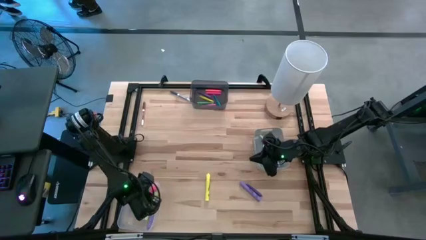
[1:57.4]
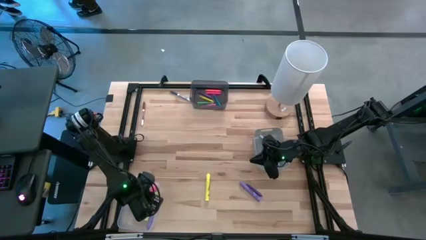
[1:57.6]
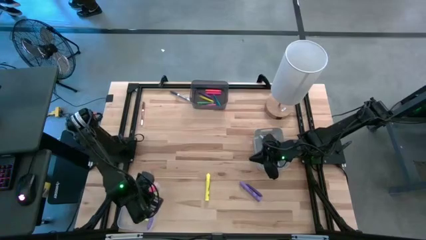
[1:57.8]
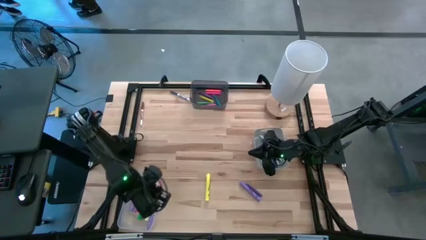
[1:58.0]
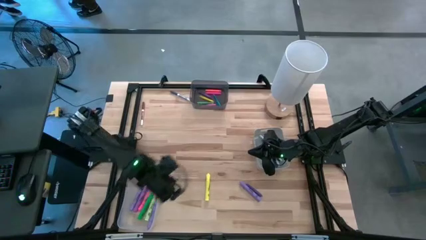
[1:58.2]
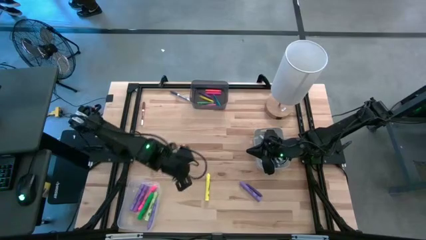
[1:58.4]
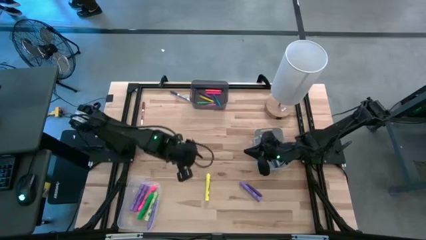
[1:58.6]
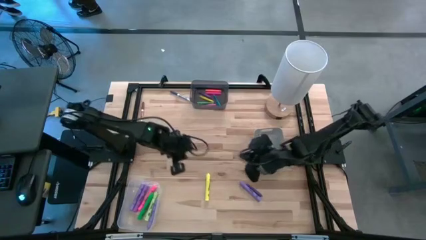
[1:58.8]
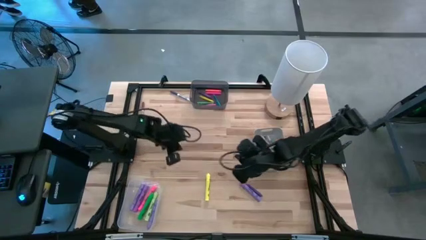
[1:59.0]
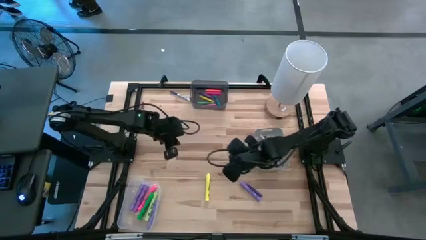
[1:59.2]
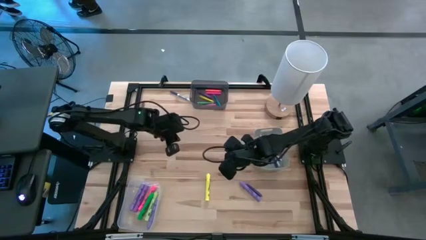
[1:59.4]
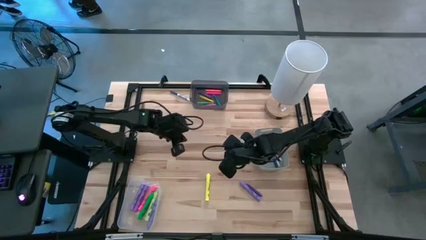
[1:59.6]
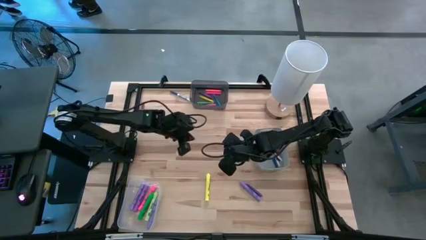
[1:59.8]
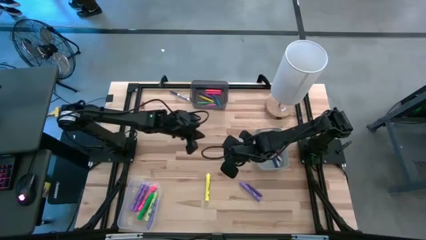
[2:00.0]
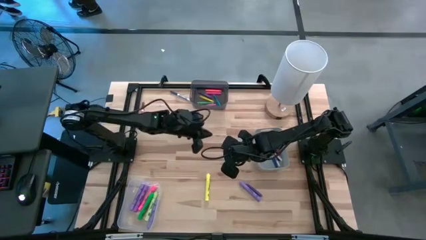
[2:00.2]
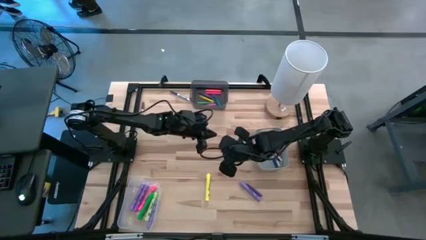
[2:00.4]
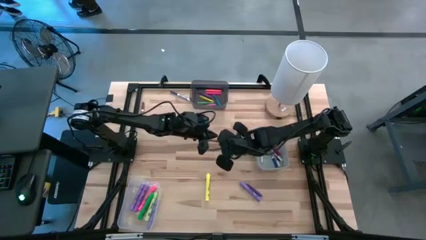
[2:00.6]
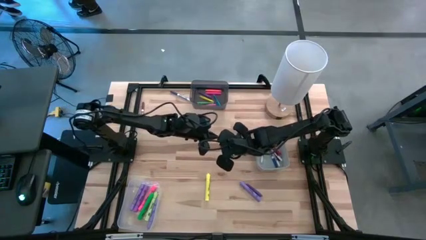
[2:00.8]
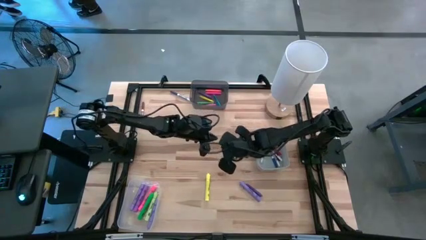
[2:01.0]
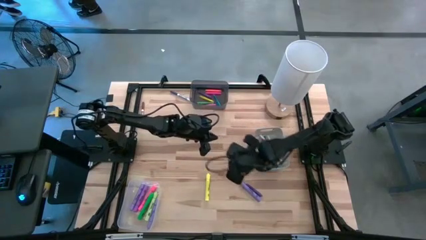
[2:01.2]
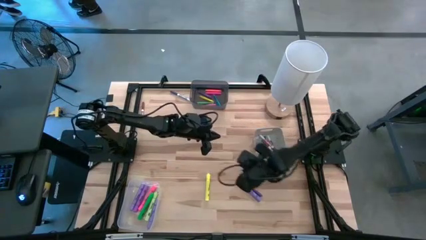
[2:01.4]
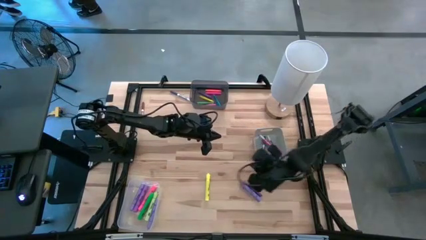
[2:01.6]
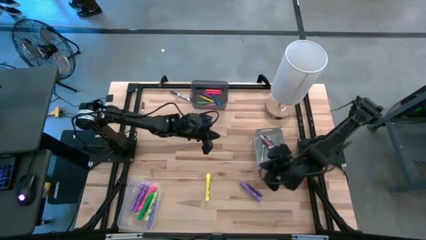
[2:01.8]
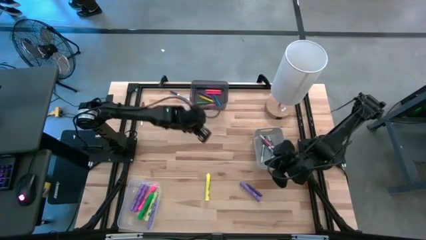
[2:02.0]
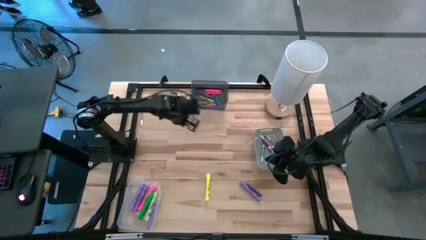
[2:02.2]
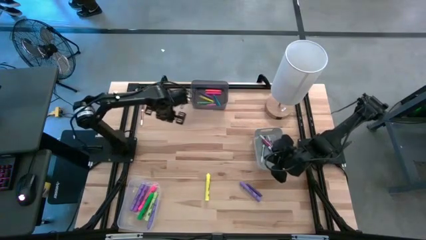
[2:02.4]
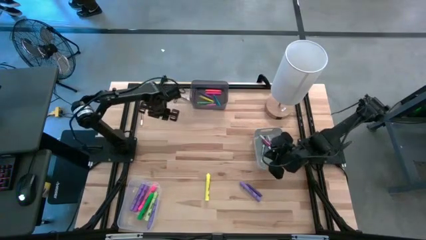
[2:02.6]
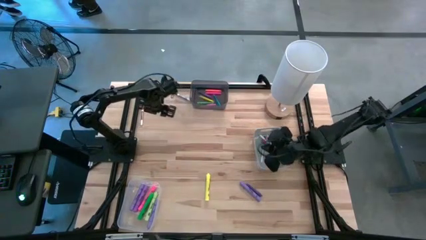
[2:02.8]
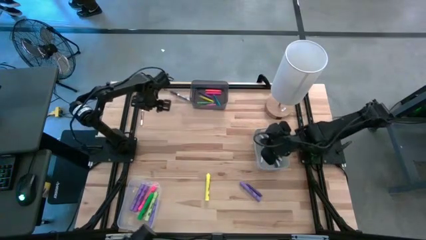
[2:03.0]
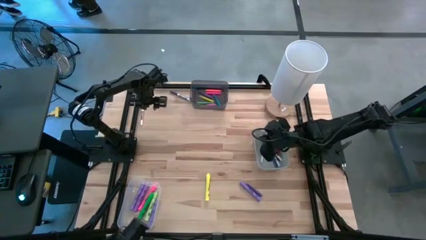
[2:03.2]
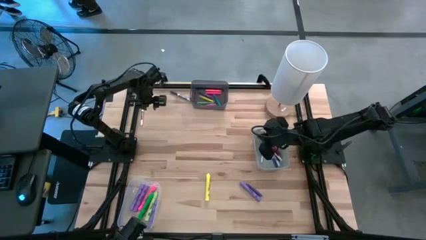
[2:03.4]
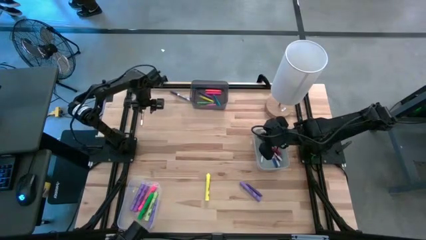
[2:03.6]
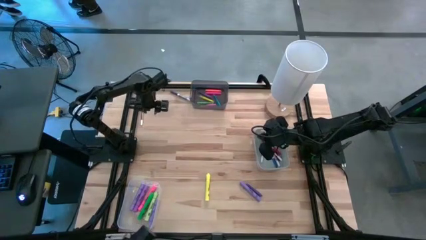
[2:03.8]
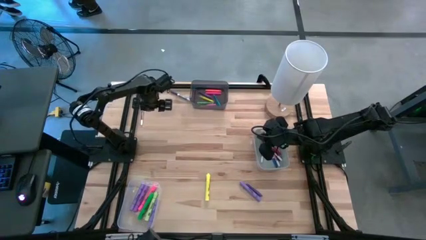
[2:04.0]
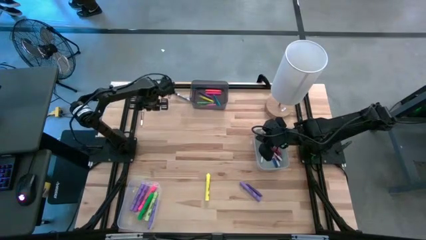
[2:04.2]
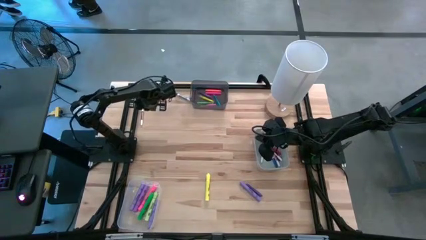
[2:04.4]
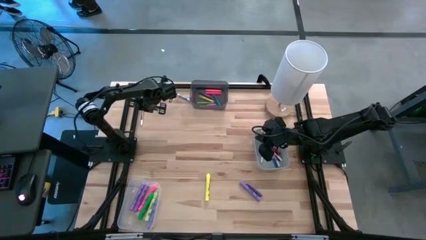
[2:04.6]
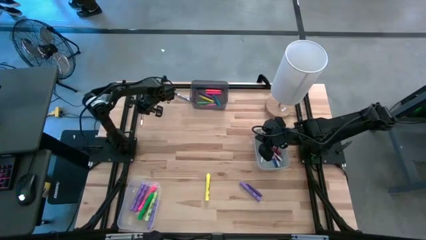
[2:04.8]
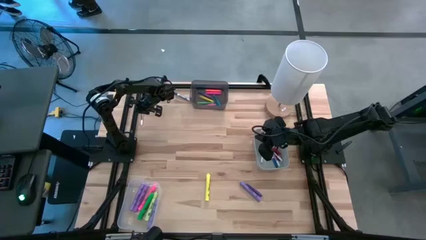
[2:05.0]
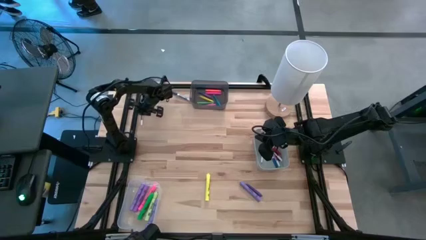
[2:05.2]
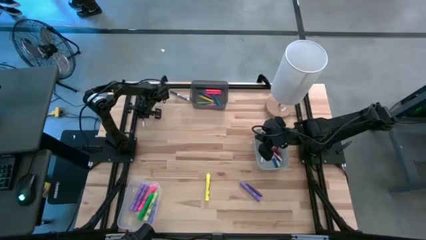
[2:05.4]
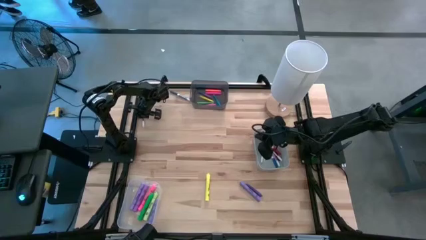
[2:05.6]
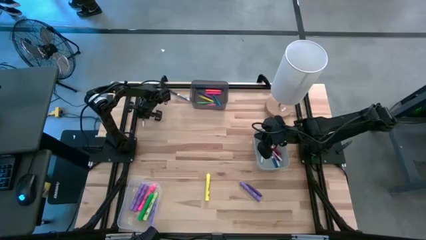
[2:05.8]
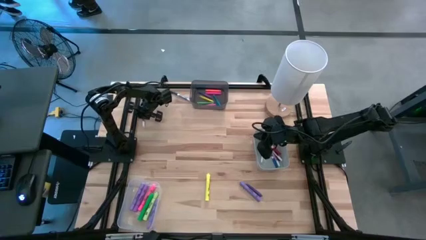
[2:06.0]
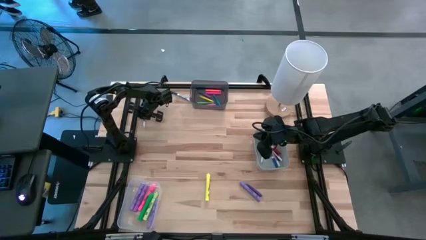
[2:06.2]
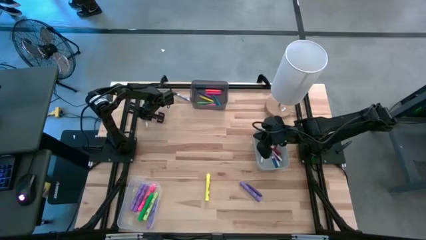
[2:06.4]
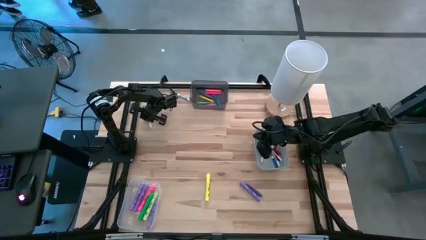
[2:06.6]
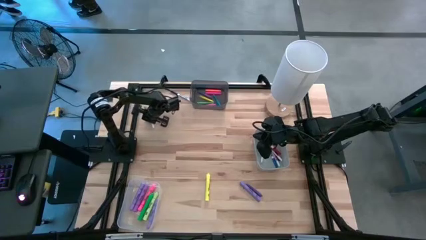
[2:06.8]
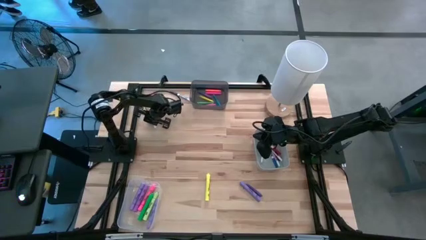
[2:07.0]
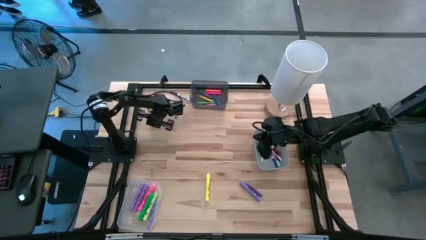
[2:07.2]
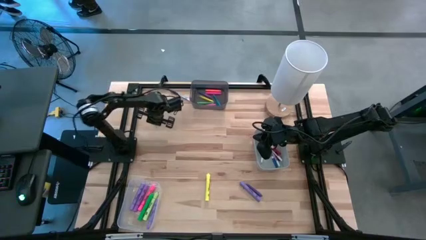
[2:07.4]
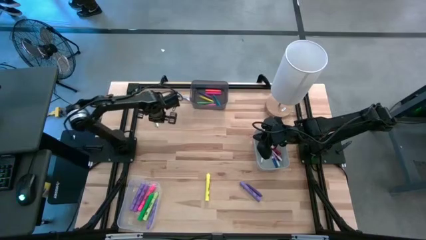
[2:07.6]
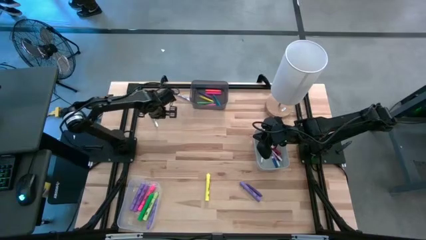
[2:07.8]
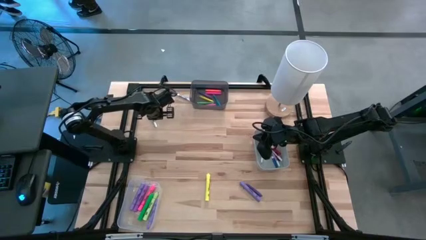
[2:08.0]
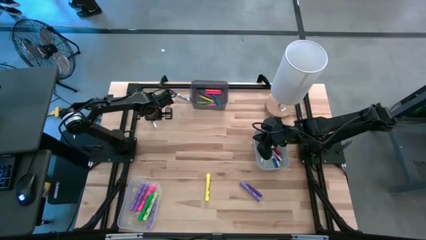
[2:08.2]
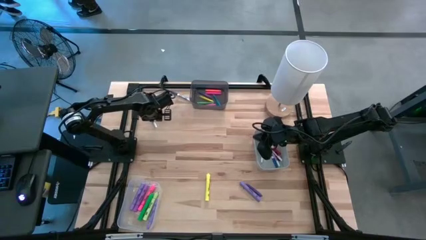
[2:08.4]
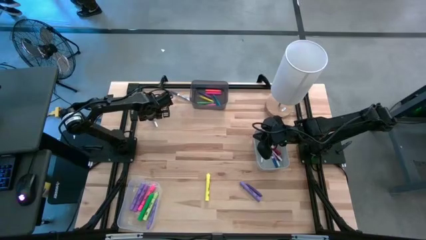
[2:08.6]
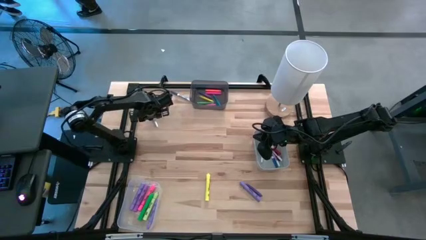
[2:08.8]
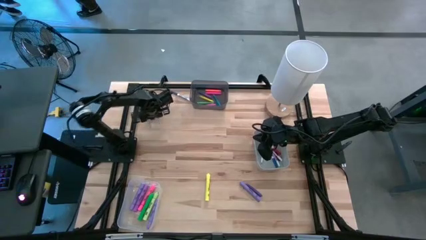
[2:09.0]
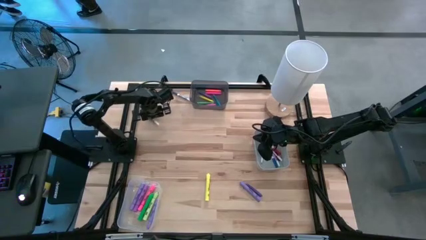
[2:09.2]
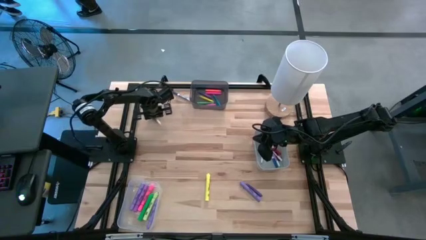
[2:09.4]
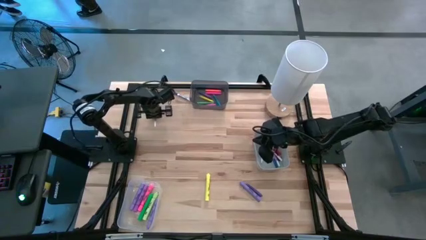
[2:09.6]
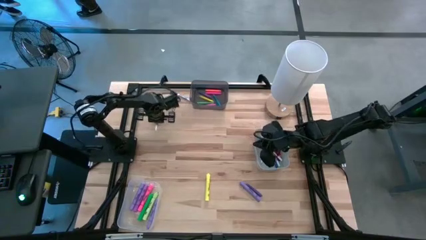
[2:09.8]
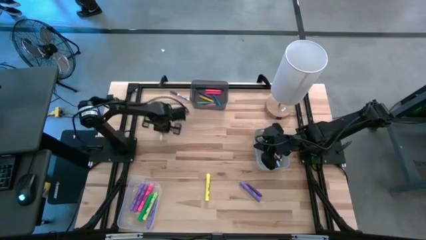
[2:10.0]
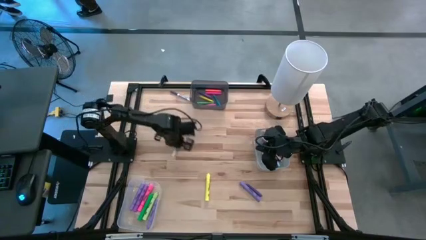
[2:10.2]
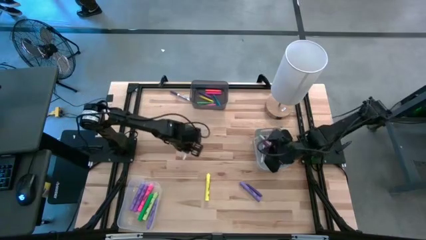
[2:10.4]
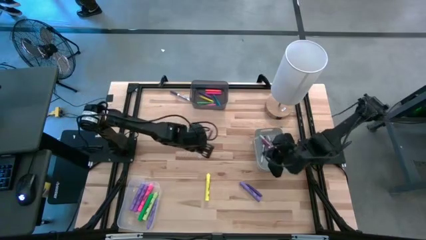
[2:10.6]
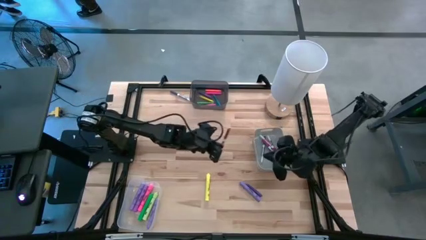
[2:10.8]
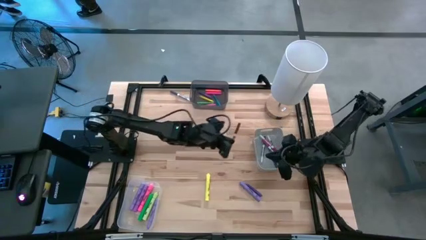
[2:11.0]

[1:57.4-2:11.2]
Task: Pick & Place Markers
Put the brown marker pen into the gray bin

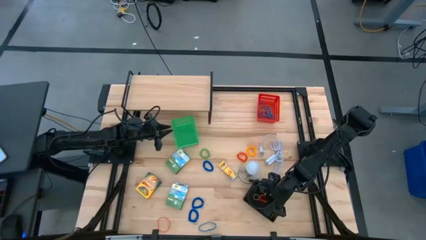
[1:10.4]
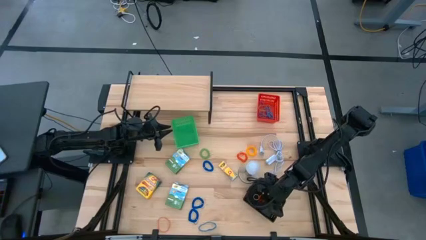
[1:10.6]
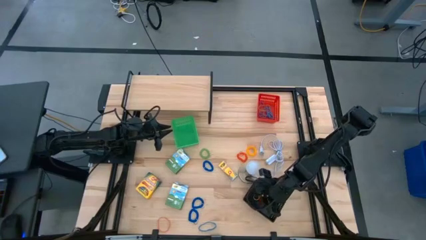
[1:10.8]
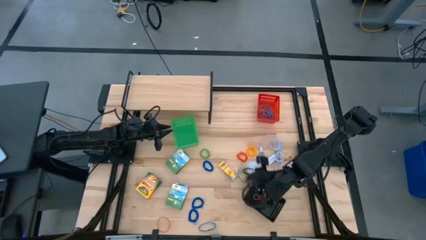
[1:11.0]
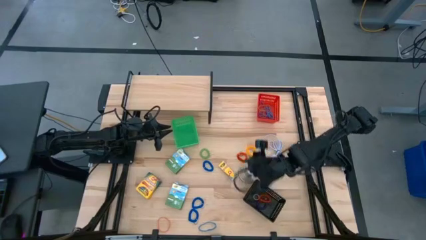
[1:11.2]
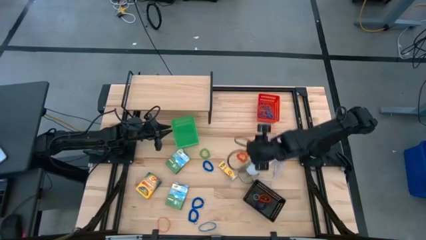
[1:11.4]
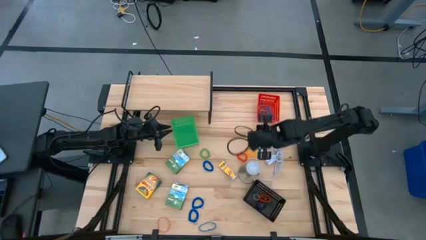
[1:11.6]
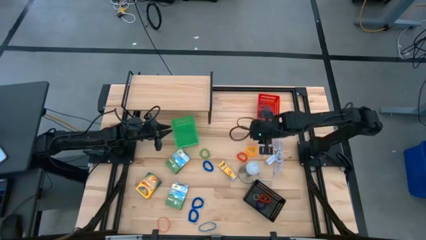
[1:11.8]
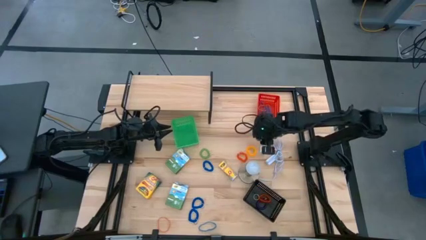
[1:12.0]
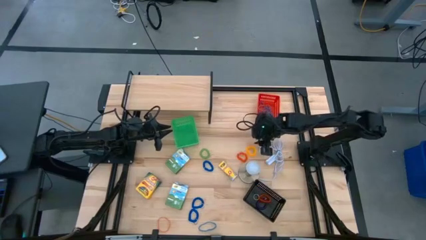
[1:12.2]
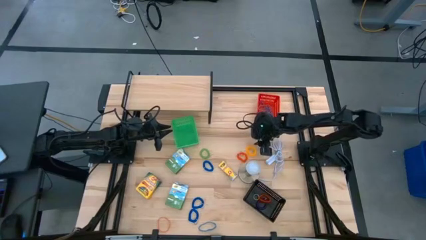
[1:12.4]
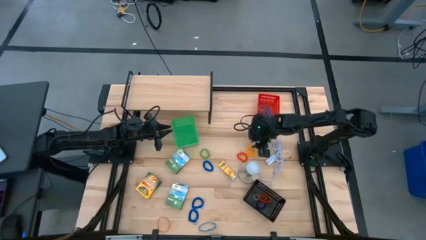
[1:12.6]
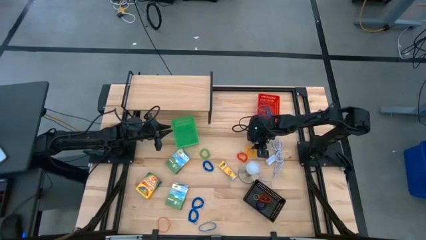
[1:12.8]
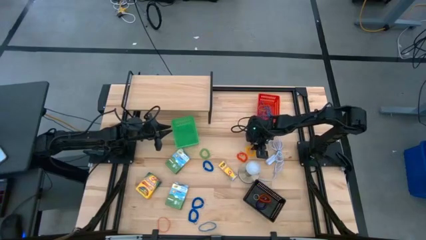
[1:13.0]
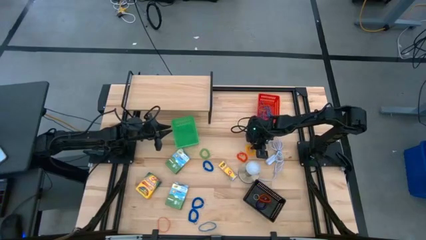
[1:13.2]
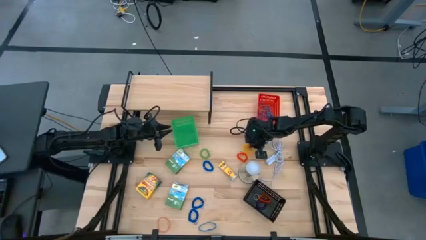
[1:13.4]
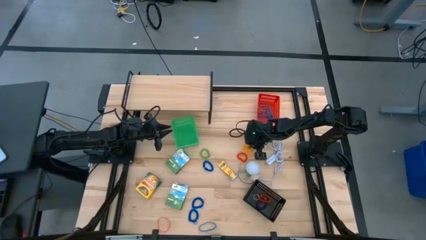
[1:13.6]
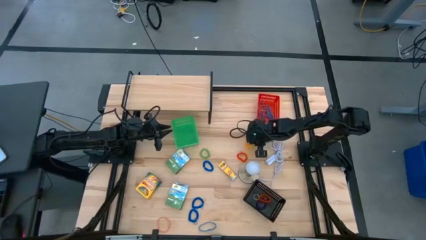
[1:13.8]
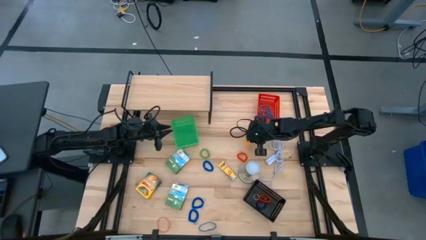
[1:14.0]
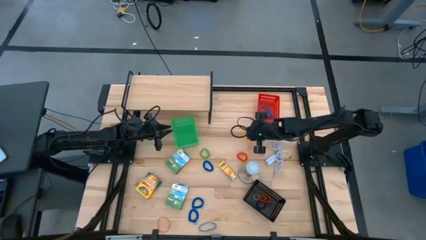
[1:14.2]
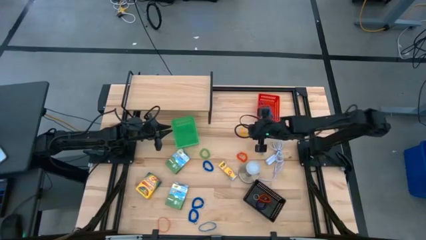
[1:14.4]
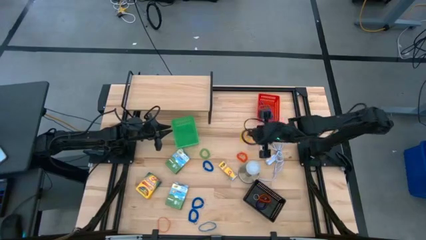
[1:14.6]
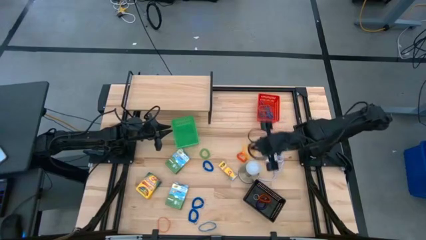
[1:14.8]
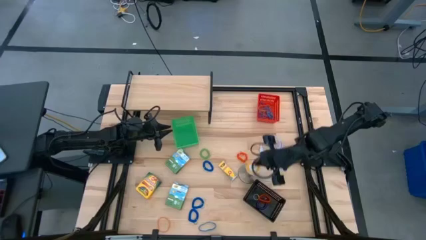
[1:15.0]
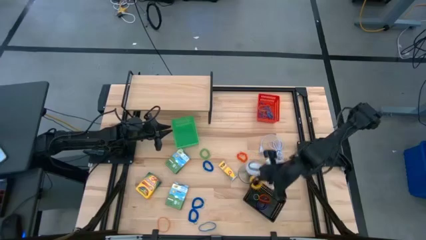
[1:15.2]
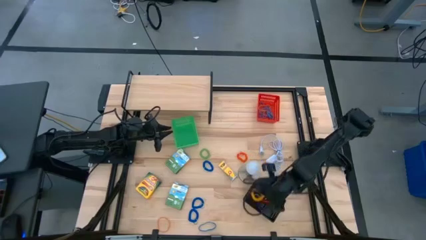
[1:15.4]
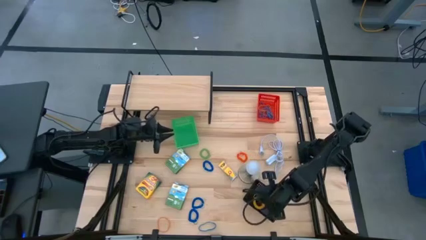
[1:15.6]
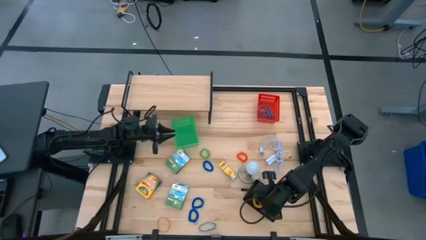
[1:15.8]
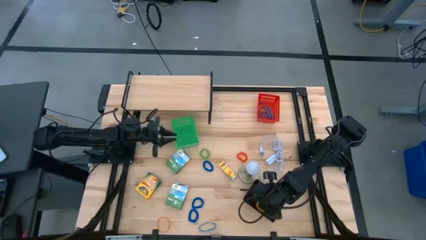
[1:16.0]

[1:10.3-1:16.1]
Task: Pick & Place Office Desk Supplies
Put the yellow spring keychain into the black basket
